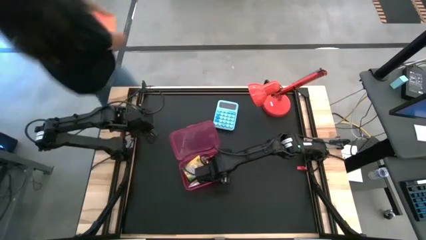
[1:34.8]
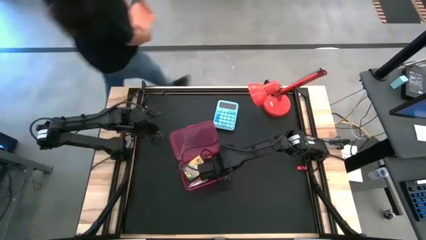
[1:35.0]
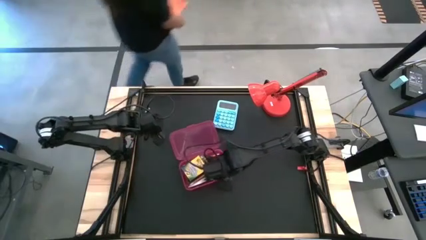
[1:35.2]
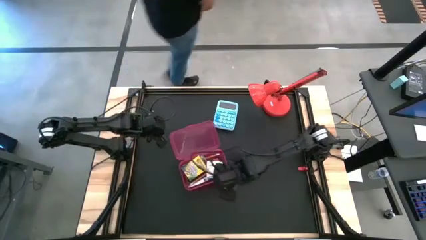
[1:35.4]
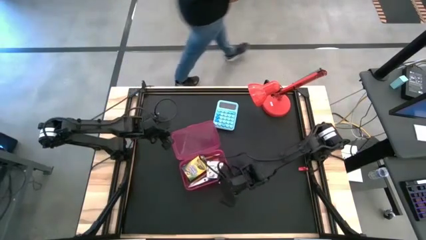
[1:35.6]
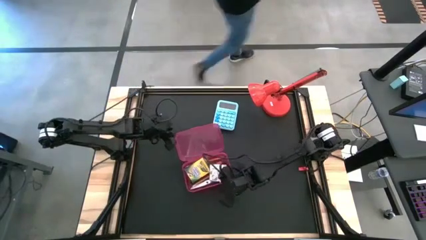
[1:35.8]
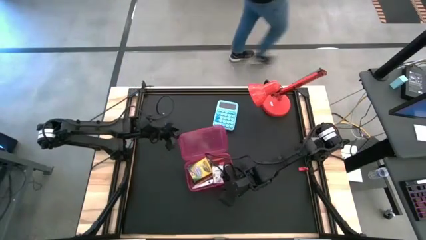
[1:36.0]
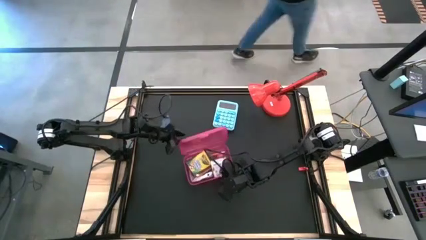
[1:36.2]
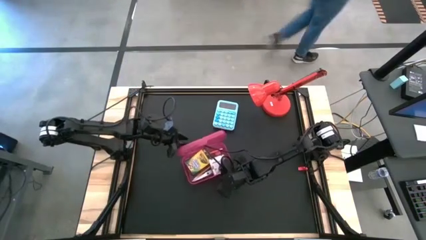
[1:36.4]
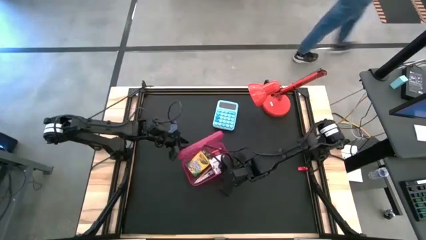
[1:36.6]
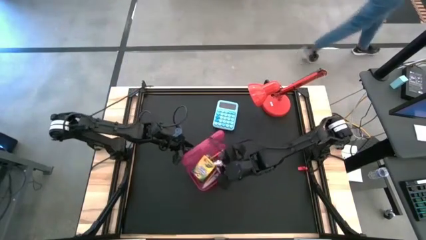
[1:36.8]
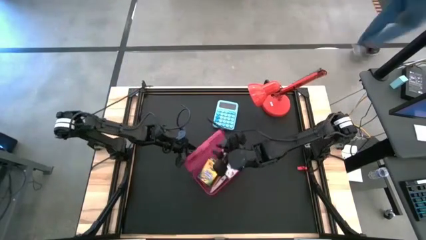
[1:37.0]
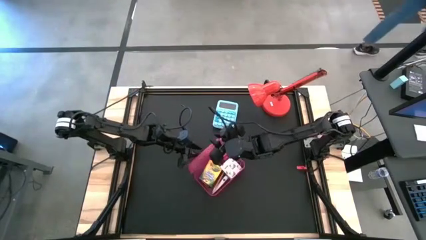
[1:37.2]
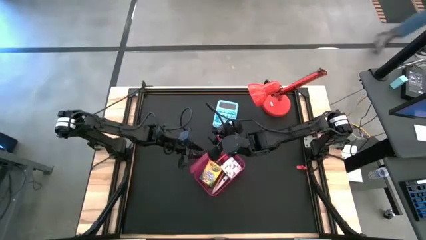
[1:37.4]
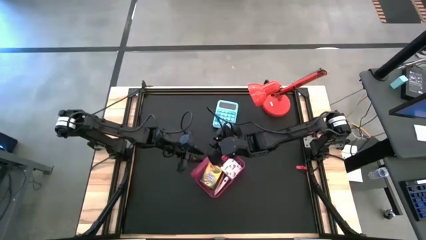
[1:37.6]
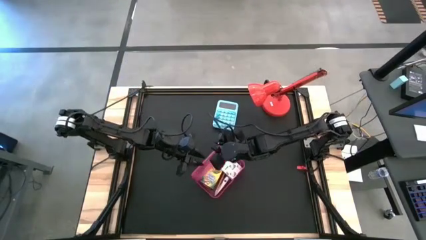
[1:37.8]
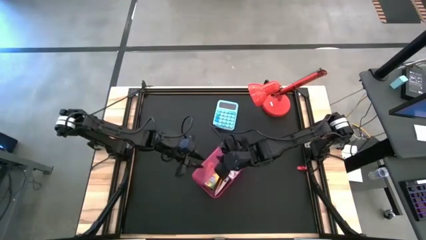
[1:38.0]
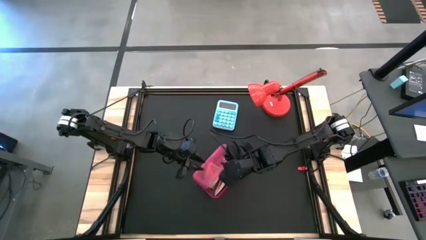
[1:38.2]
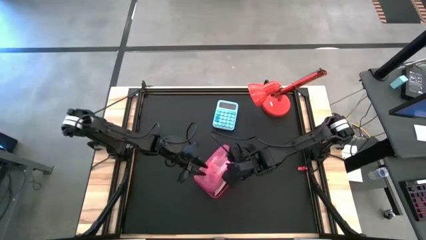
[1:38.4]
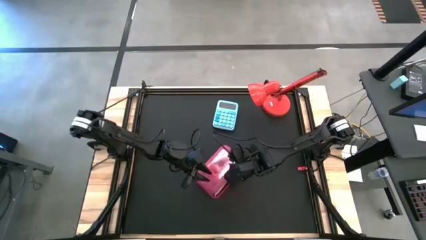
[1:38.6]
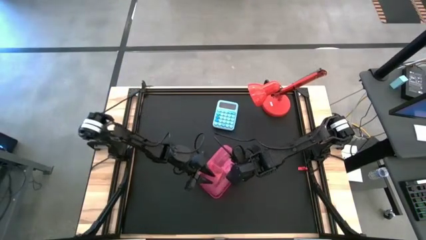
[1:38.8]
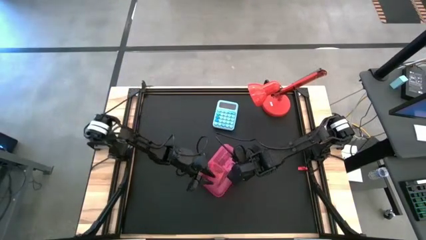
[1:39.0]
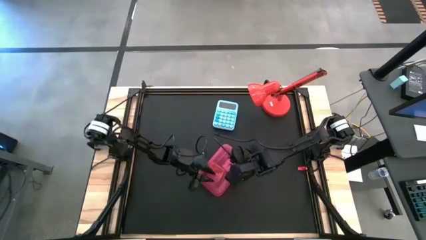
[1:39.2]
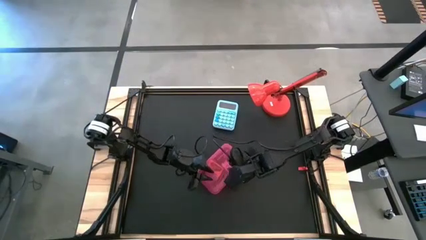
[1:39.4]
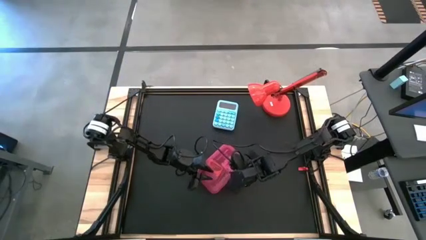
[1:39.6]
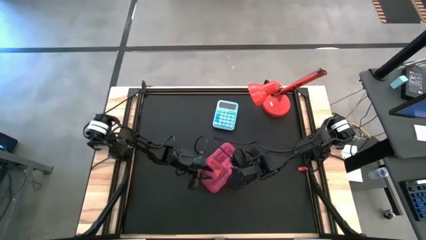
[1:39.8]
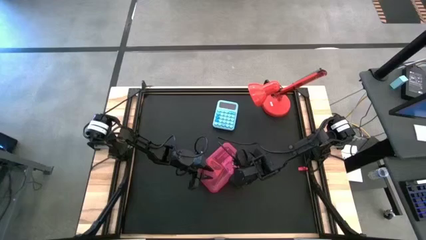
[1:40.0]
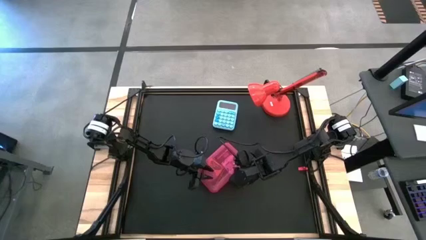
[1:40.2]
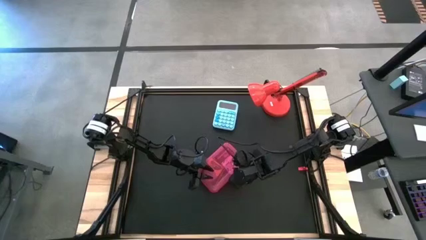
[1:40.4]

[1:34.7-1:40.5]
Task: Pack school essentials
Close the red supply box

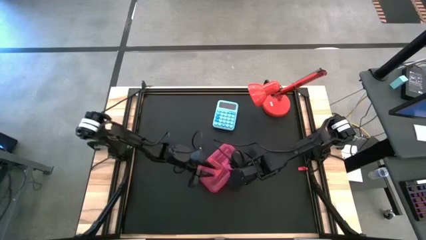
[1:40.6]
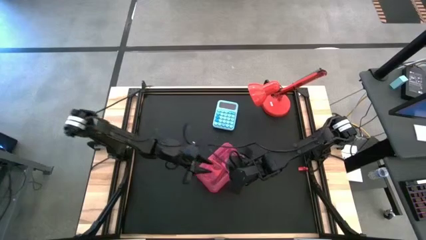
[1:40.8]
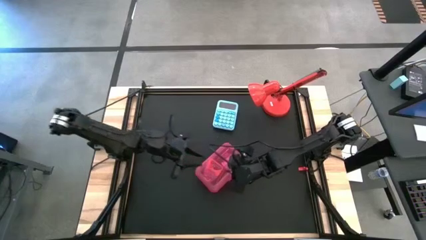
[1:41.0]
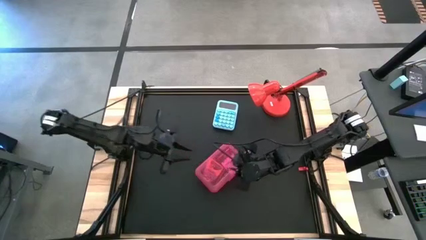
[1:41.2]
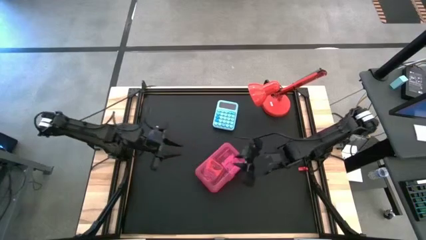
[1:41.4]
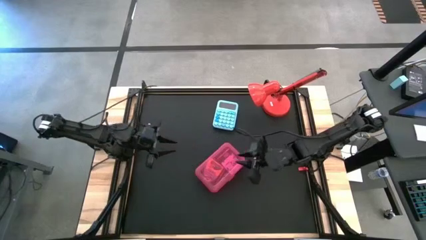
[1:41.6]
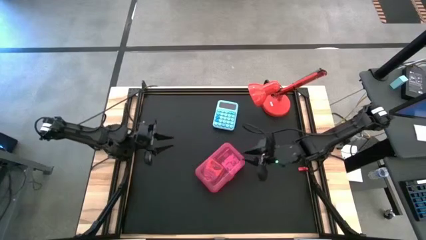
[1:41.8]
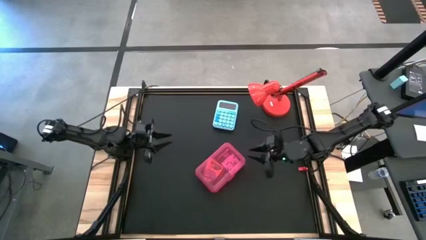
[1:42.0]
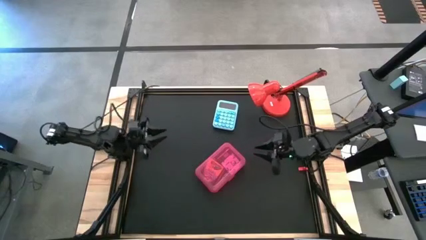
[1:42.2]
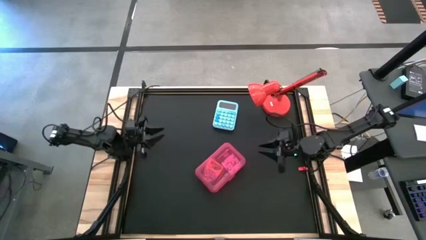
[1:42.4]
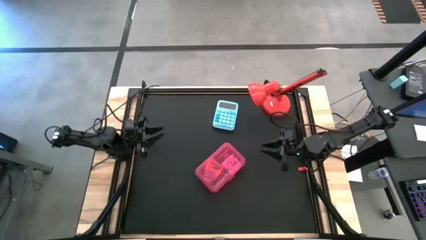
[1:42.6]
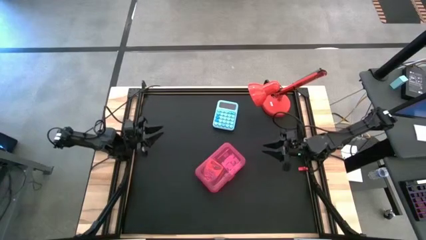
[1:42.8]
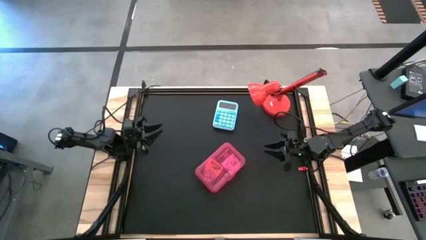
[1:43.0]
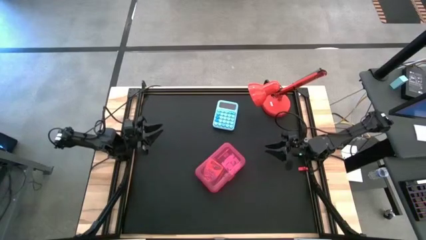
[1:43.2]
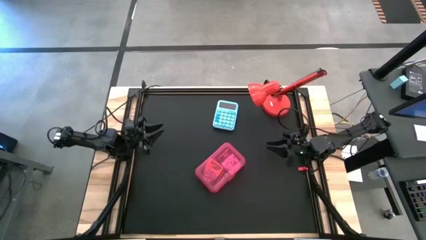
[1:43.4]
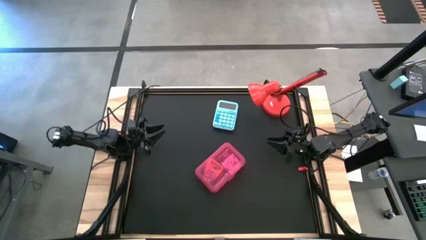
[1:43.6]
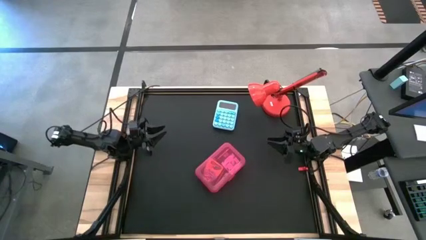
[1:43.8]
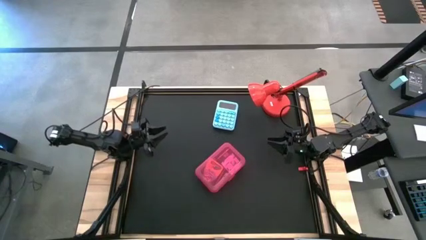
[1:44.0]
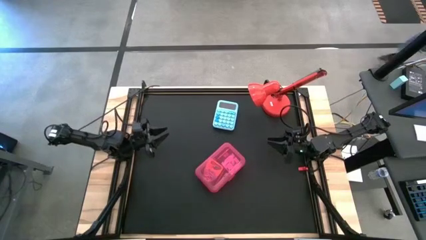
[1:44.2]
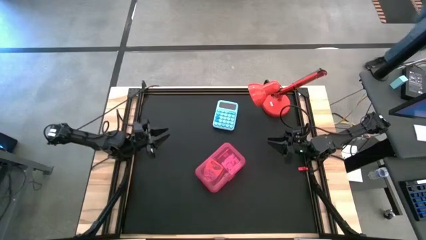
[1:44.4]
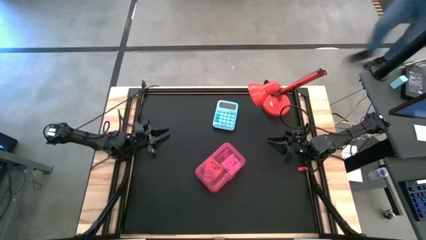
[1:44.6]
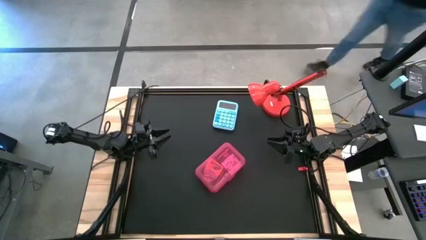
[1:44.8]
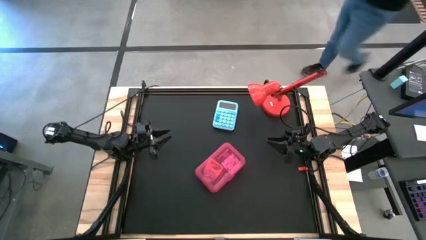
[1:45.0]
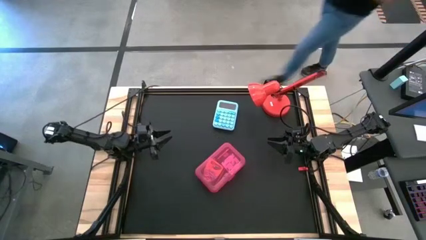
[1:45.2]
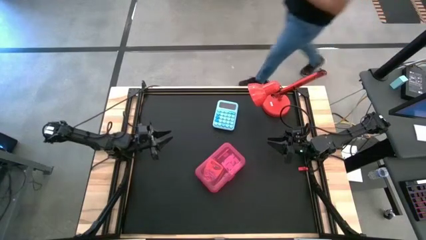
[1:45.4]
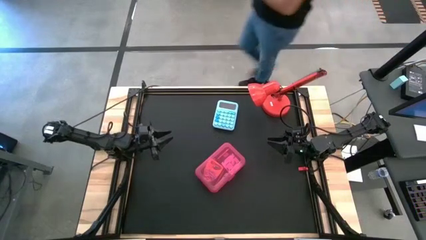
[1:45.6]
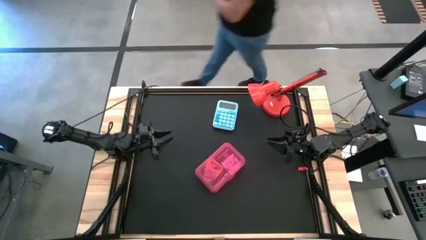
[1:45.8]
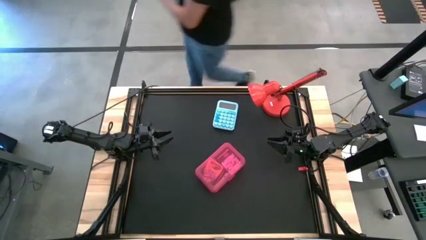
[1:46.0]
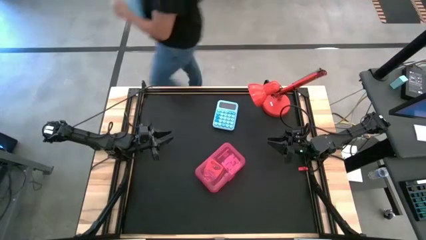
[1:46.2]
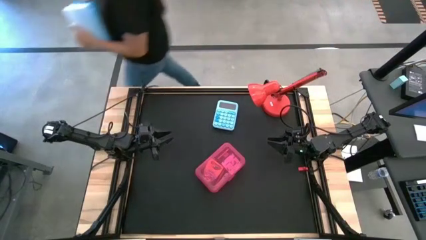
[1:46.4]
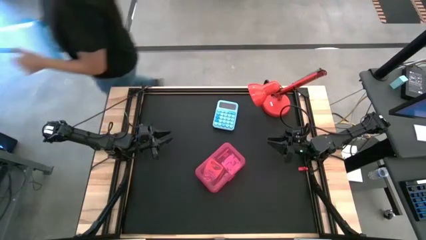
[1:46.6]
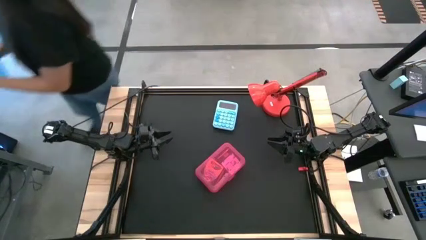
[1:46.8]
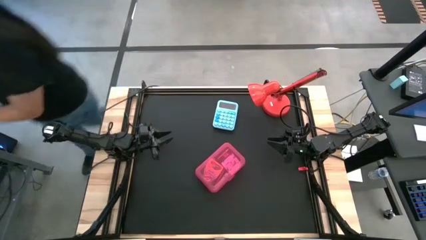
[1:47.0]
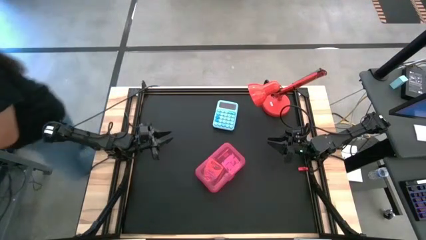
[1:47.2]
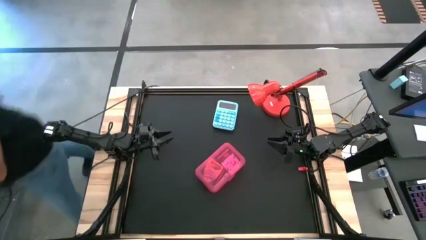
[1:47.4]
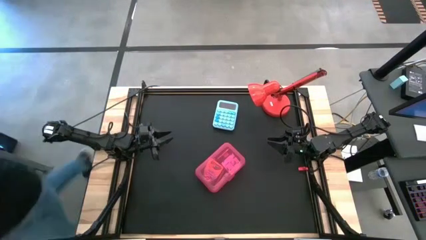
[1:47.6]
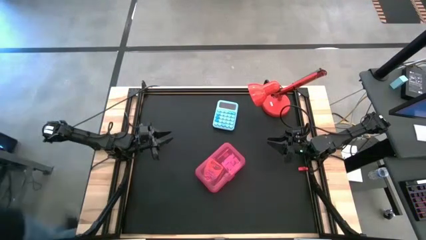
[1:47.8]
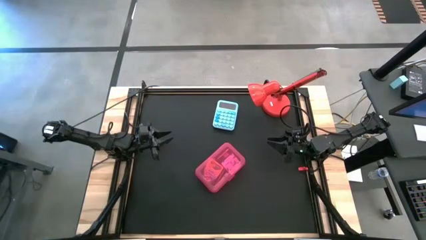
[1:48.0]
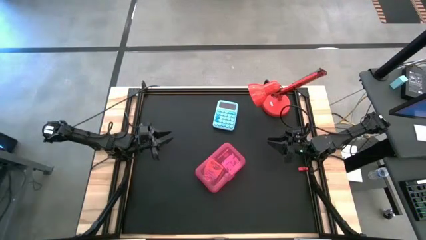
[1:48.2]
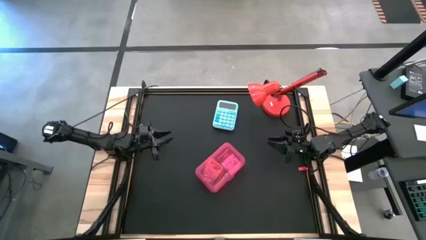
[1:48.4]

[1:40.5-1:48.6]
Return to Home Position

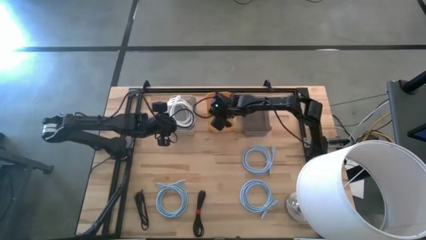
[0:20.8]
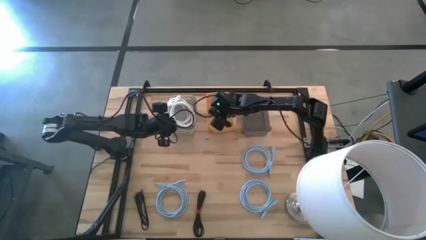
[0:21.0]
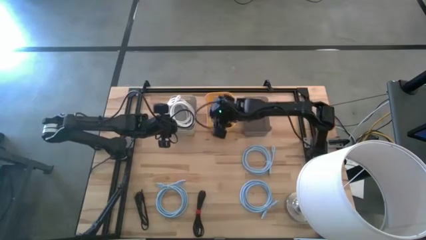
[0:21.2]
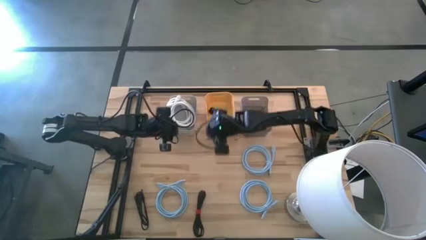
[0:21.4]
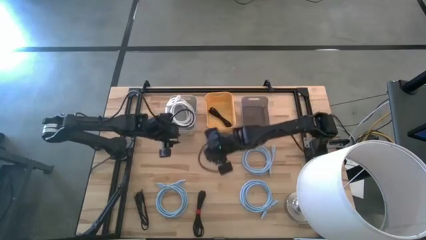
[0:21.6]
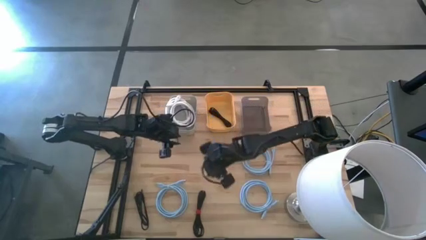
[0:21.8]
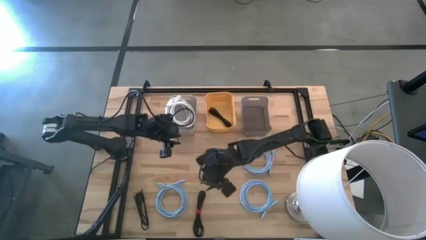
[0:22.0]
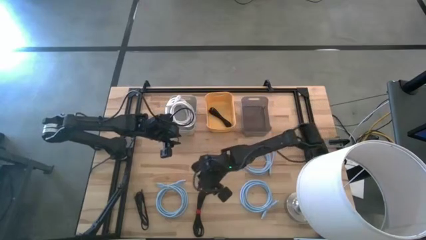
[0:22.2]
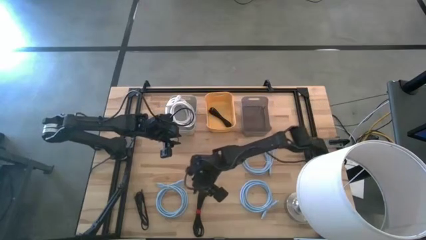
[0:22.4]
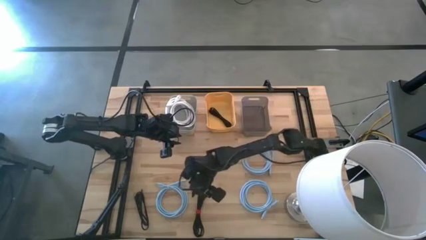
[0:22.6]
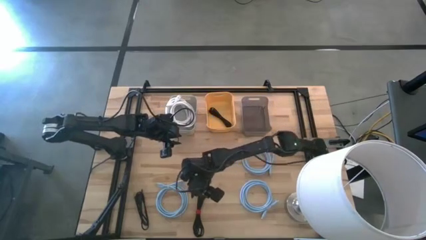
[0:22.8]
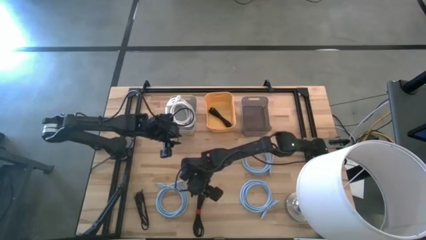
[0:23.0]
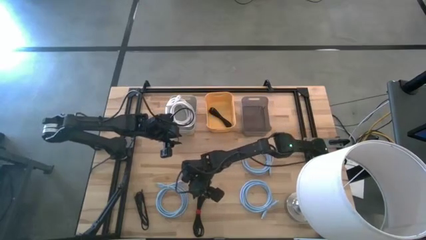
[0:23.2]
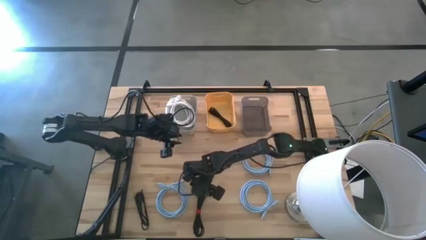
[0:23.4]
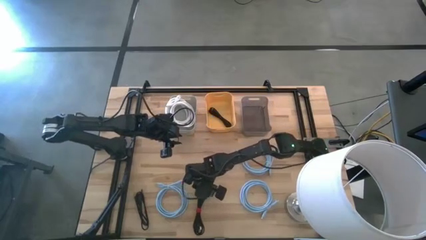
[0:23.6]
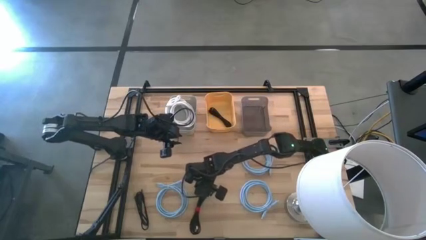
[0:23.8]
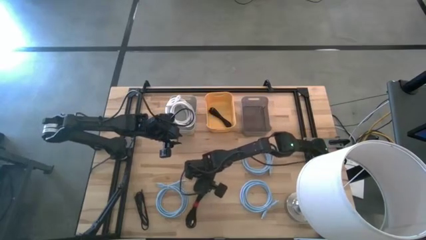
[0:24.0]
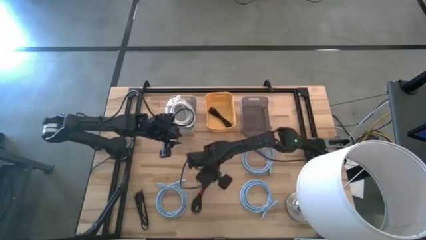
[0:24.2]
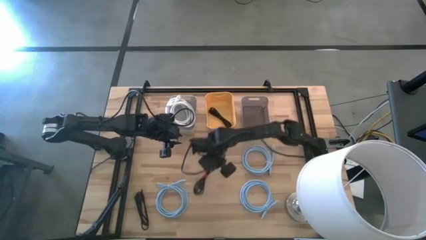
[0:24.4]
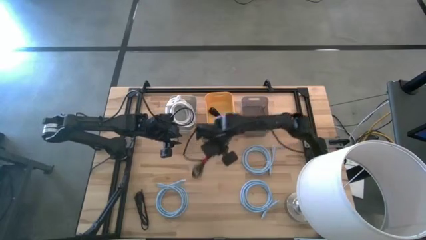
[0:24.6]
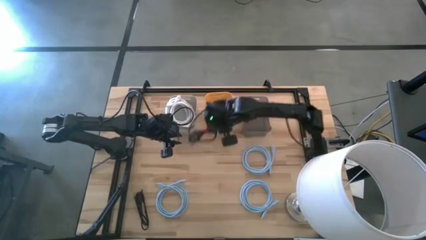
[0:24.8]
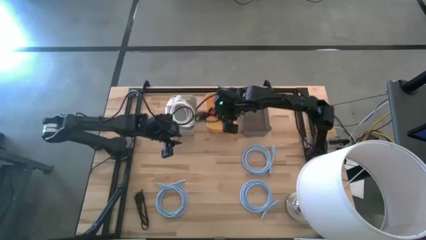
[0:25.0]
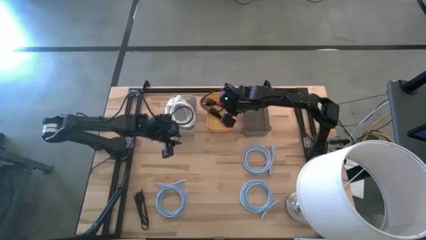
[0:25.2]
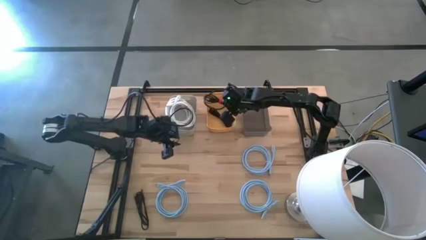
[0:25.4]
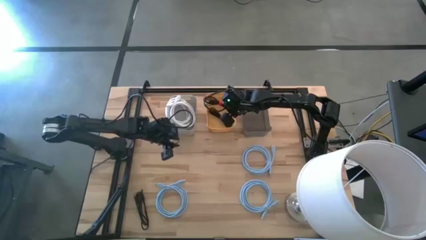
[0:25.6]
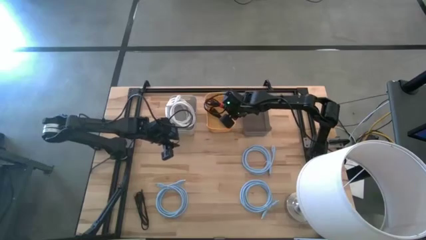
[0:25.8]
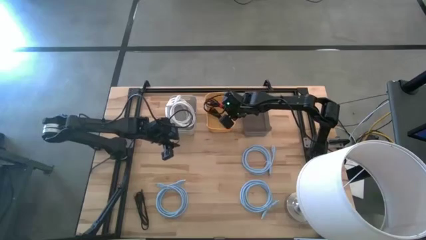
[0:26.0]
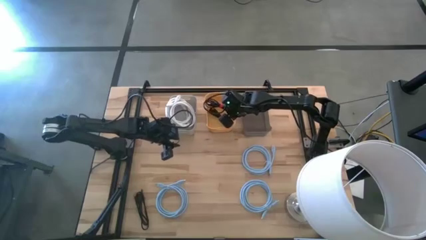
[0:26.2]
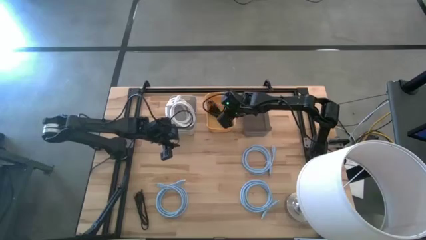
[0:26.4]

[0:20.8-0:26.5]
Task: Sort HDMI cables
Put the right black HDMI cable into the yellow bin
